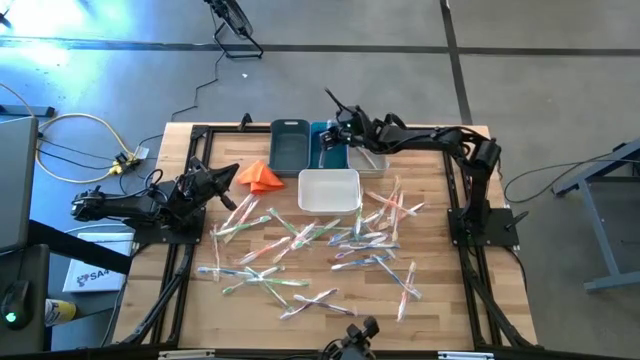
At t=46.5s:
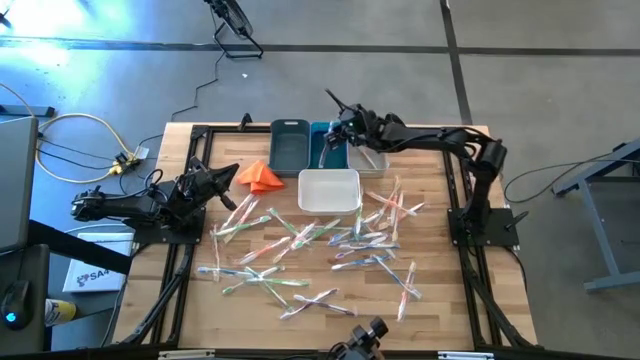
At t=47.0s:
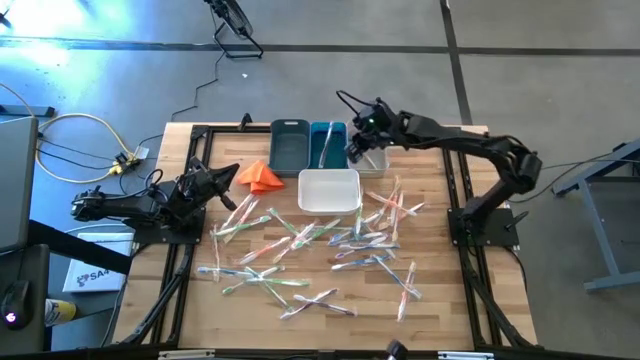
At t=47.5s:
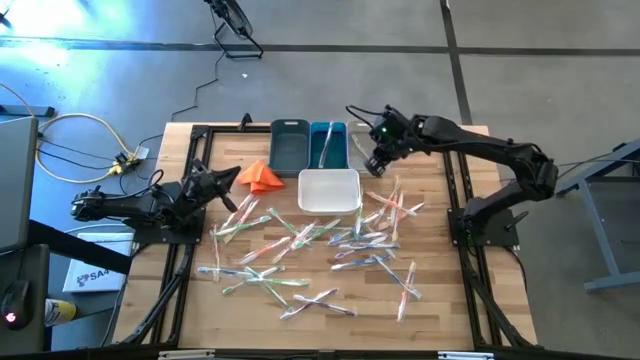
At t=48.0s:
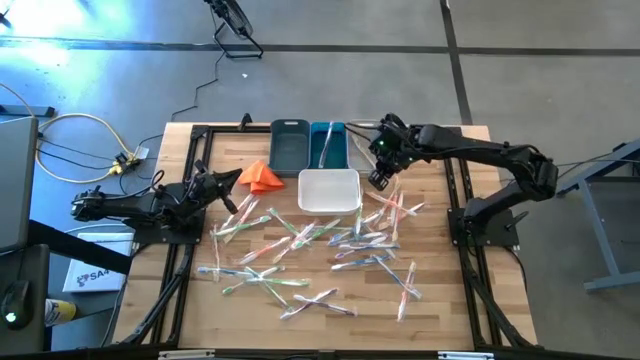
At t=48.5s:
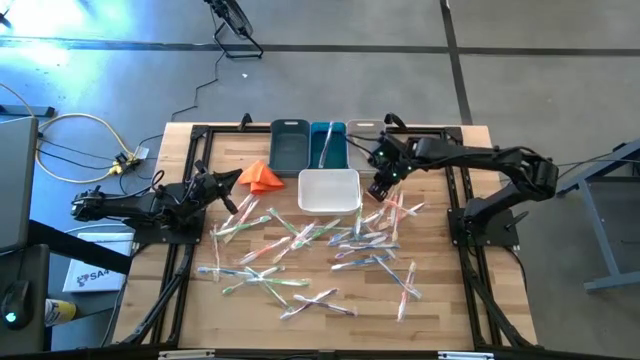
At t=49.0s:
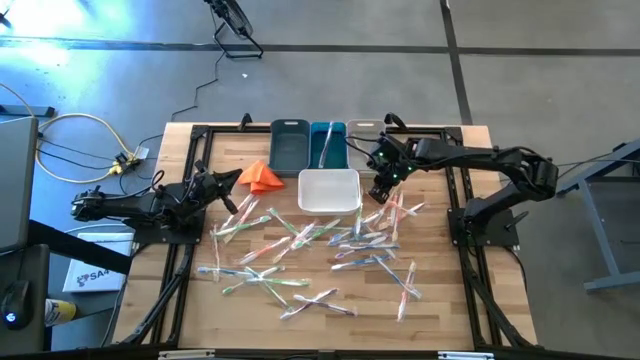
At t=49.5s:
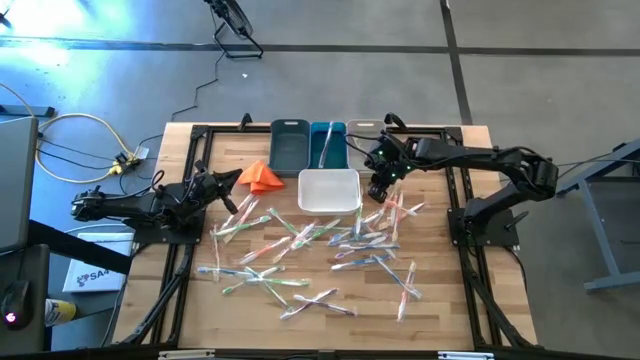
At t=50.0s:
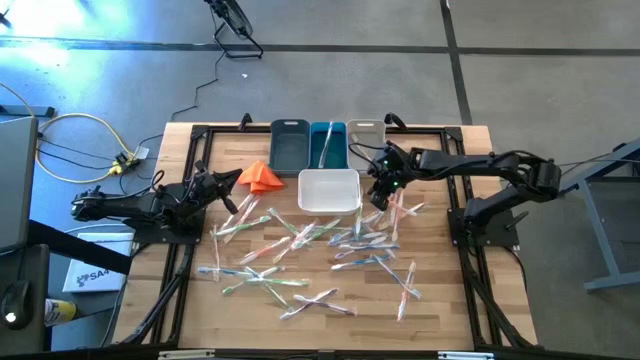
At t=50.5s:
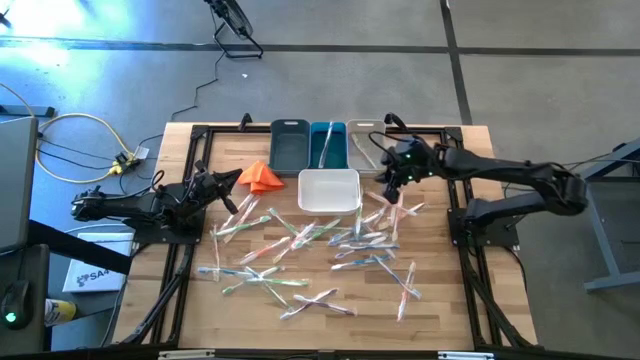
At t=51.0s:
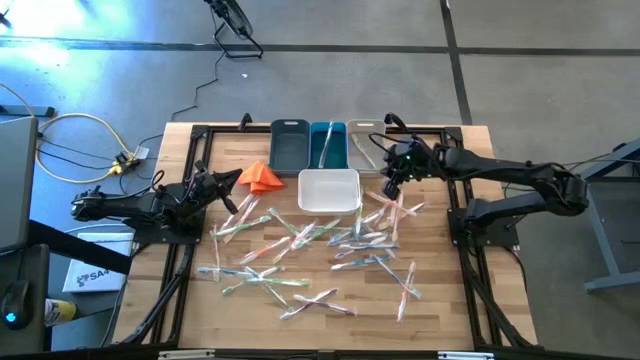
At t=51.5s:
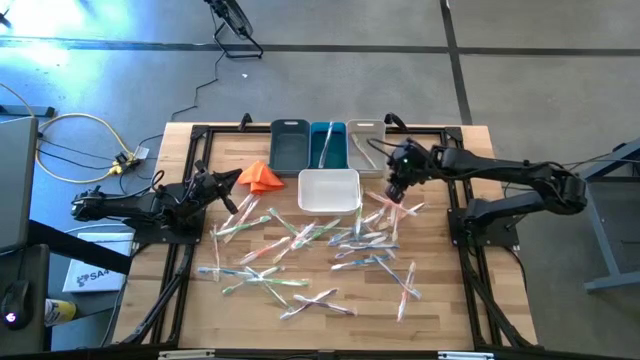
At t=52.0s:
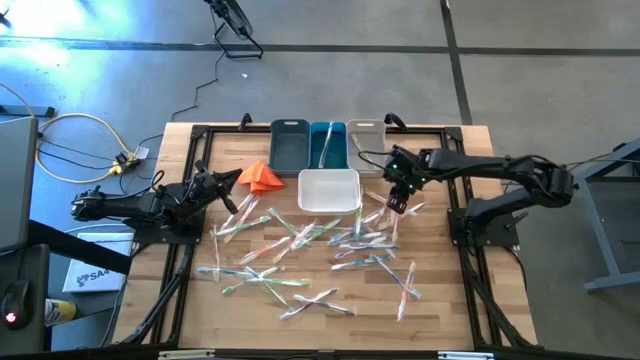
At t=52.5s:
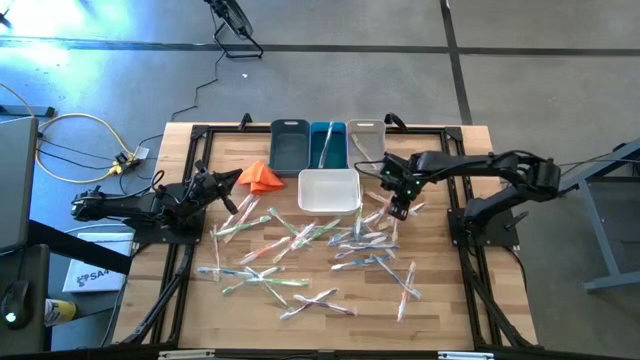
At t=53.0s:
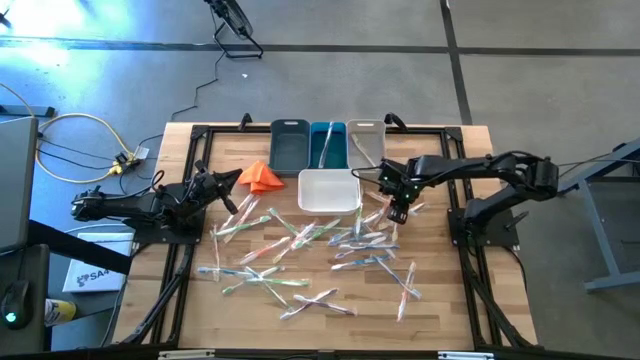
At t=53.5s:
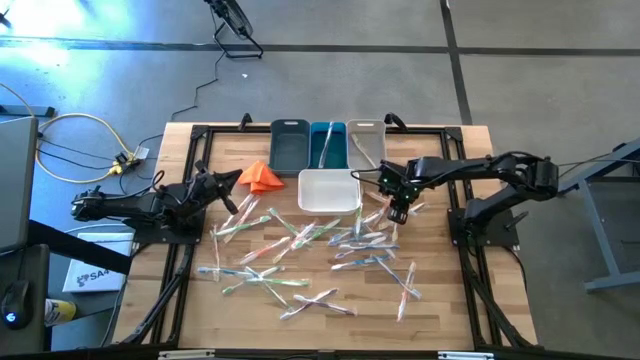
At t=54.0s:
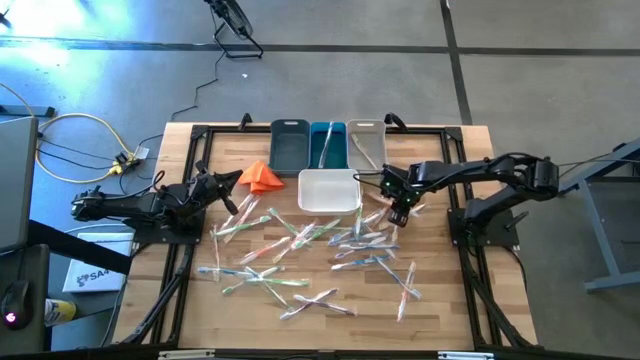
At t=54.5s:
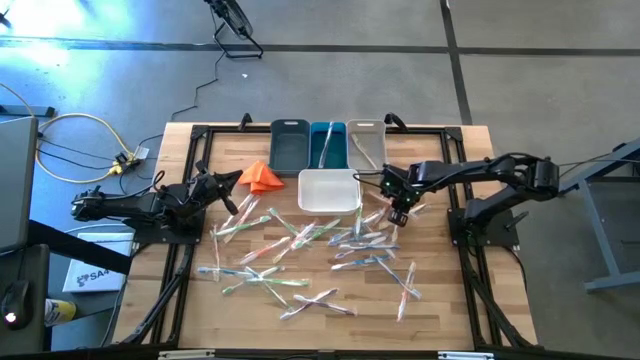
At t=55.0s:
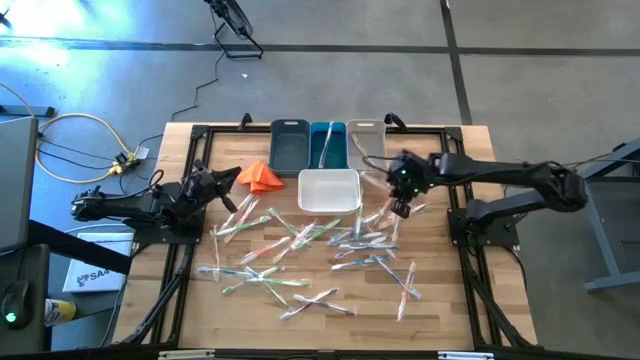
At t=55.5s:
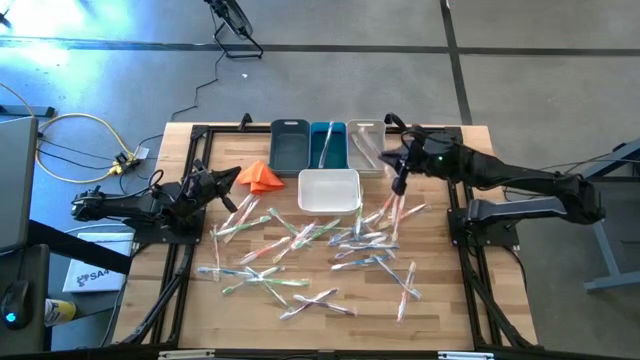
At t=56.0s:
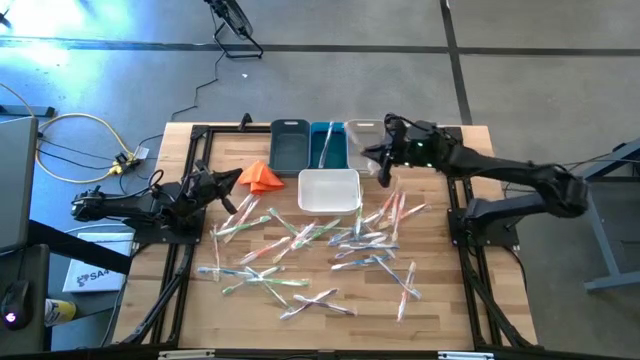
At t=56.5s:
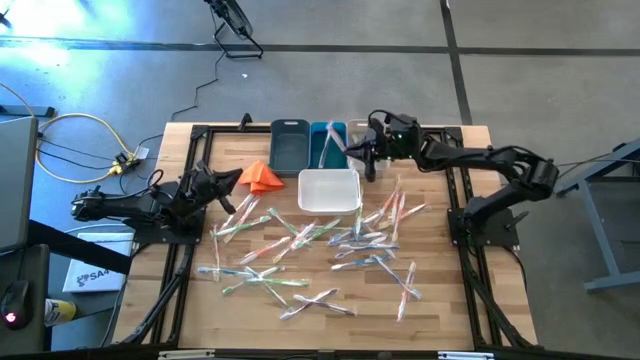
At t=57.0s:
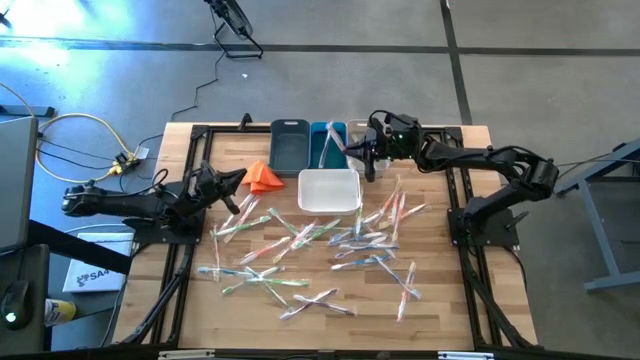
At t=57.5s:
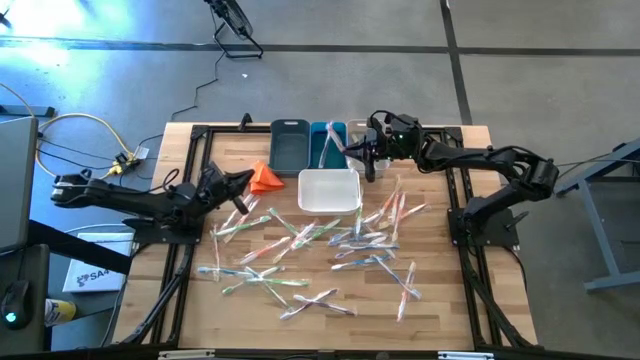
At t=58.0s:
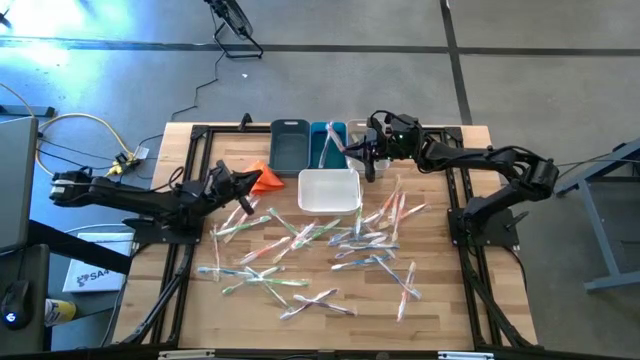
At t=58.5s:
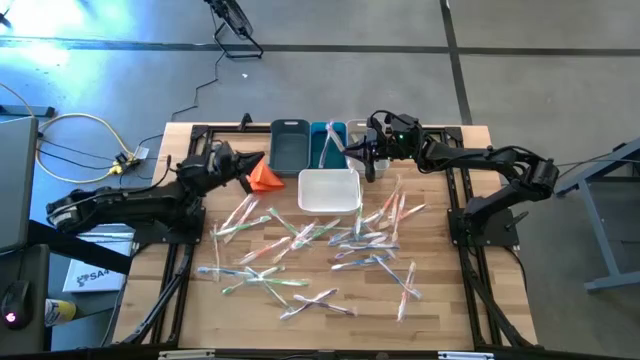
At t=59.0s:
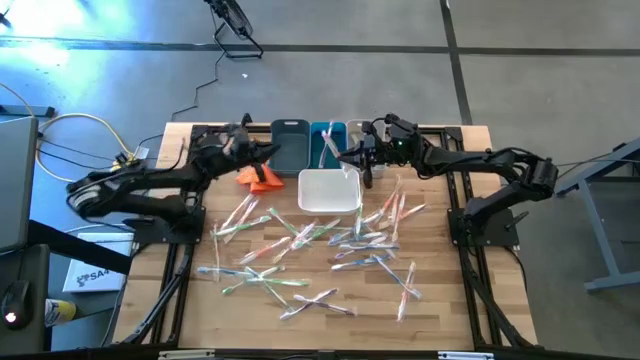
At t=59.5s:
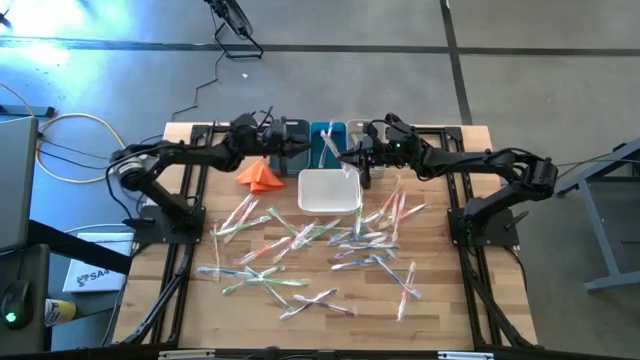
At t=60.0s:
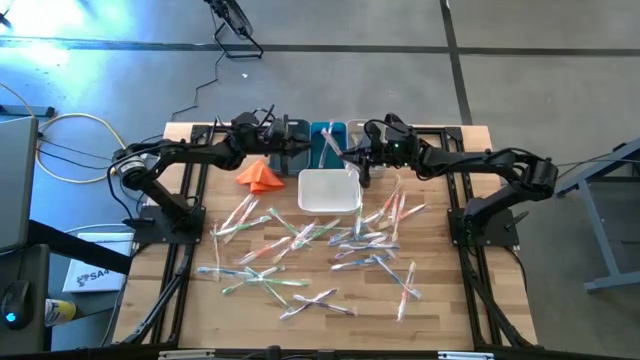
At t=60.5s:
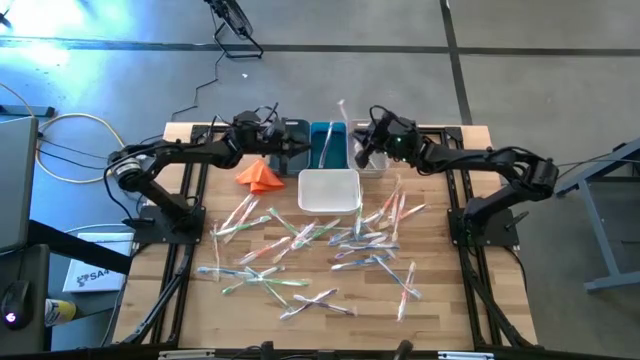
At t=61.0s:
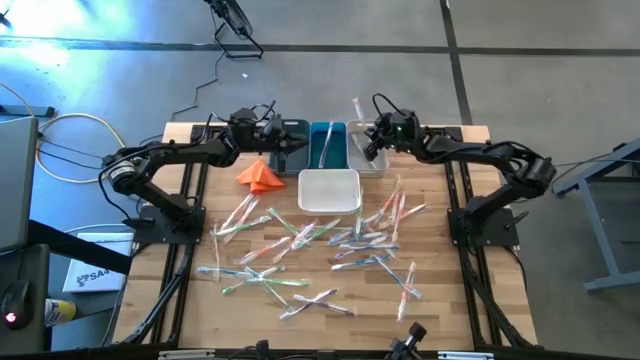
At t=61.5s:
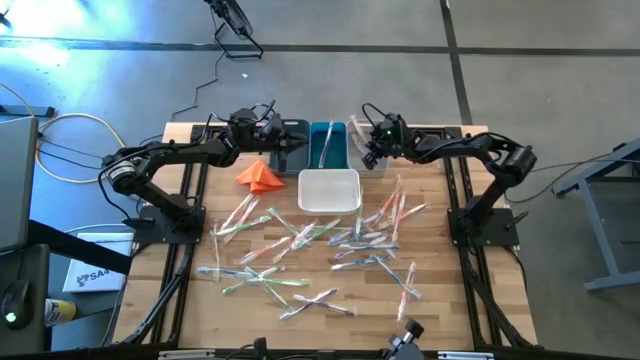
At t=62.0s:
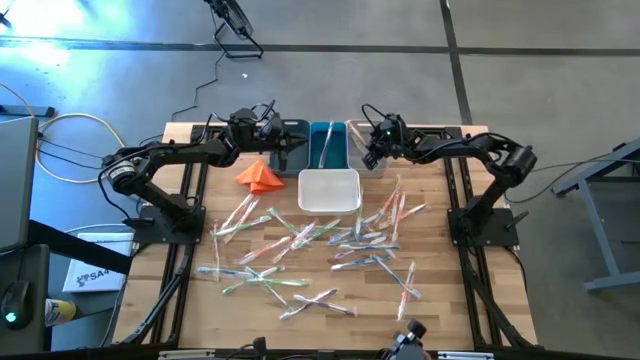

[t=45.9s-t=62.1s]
Task: Pick & Place Toothbrushes
Put the orange toothbrush into the gray bin

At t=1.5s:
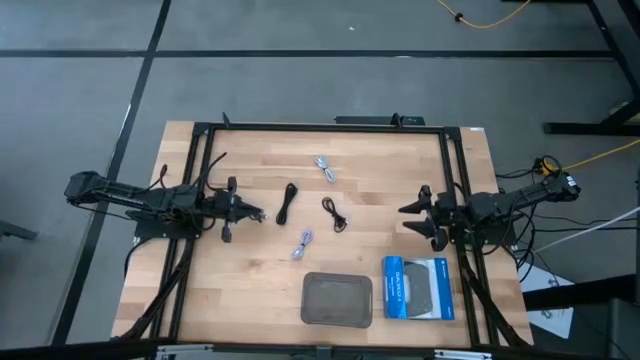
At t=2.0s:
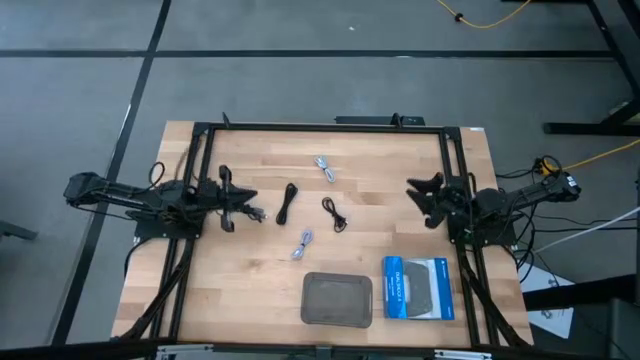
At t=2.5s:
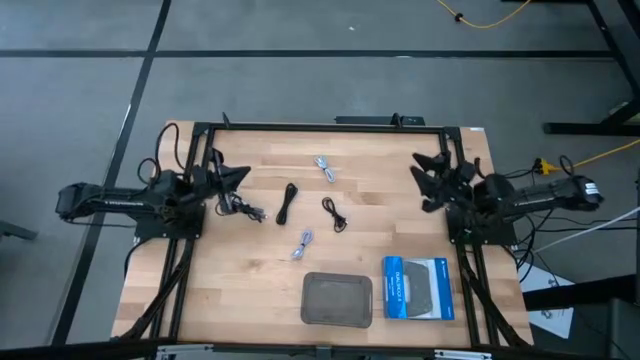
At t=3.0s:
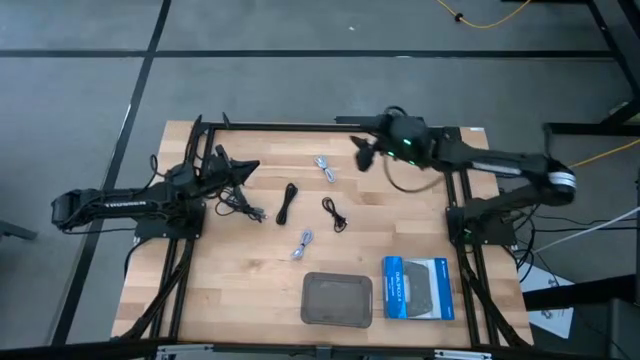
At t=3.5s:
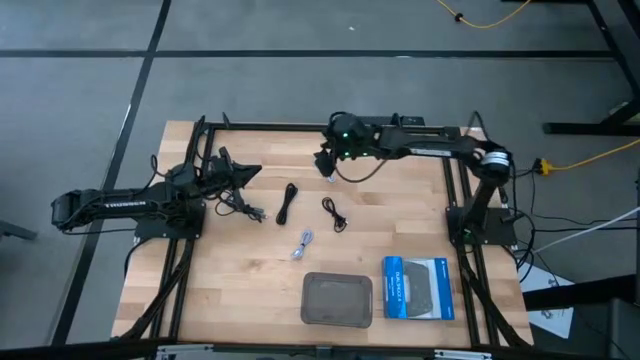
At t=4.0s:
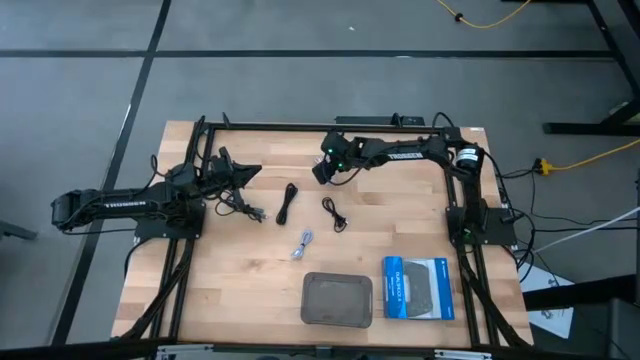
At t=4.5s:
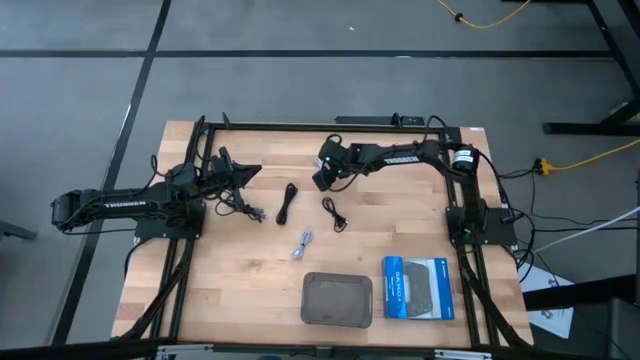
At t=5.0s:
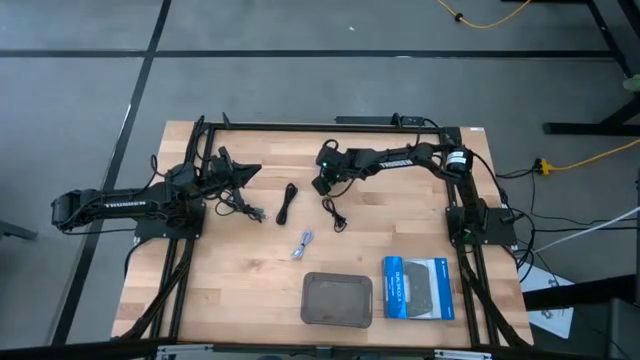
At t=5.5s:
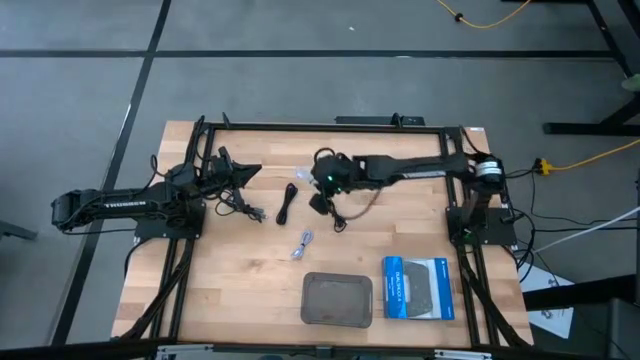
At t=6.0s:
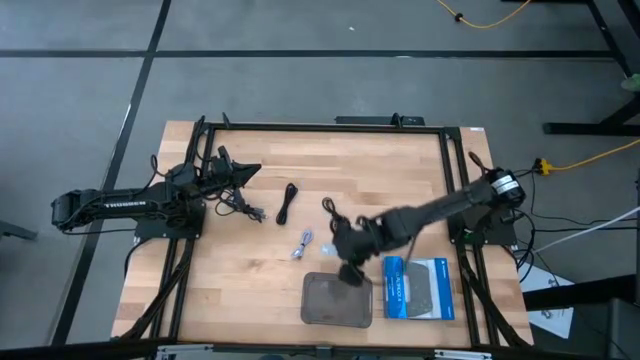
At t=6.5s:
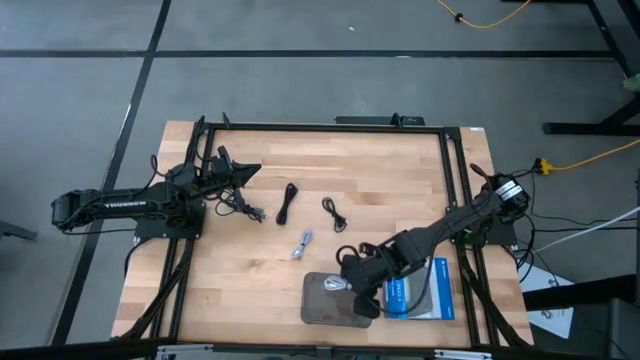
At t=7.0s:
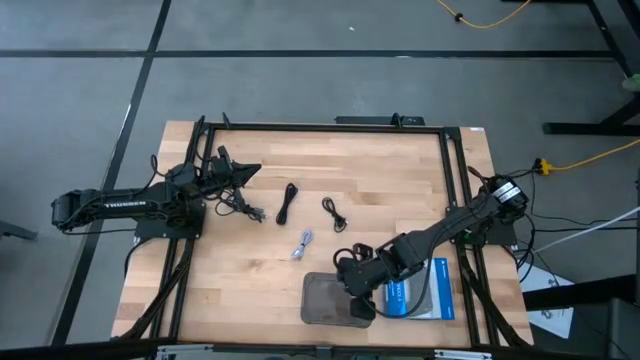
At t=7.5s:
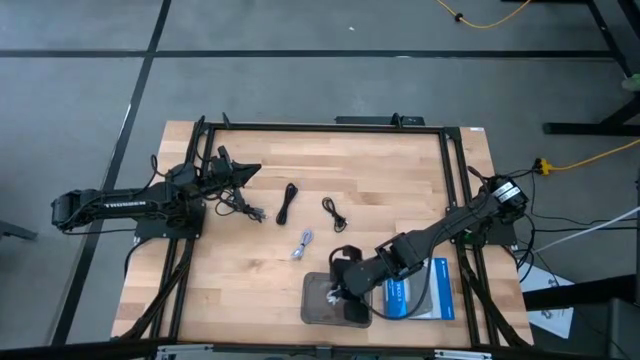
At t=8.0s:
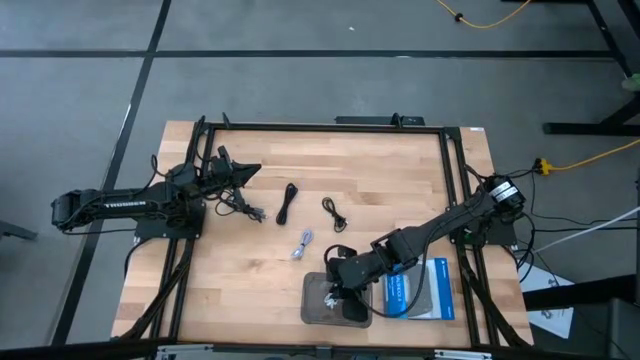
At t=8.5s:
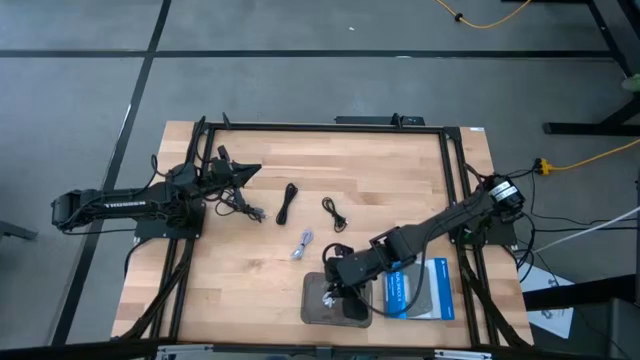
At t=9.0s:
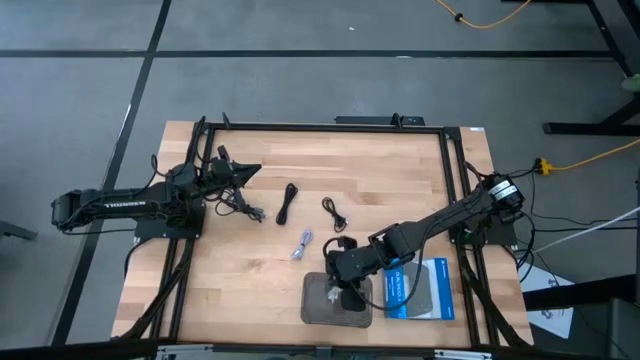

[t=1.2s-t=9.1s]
Task: Pick and place USB-C Cables
Put the white charger cable into the black bin
